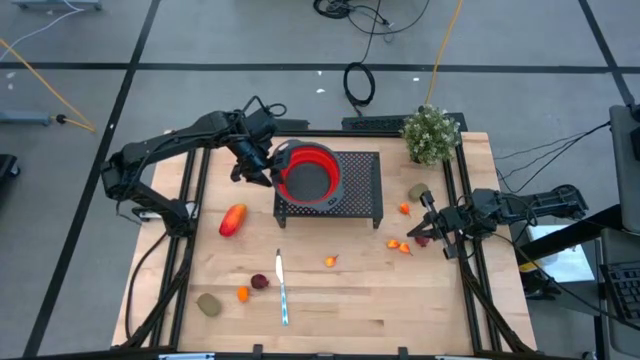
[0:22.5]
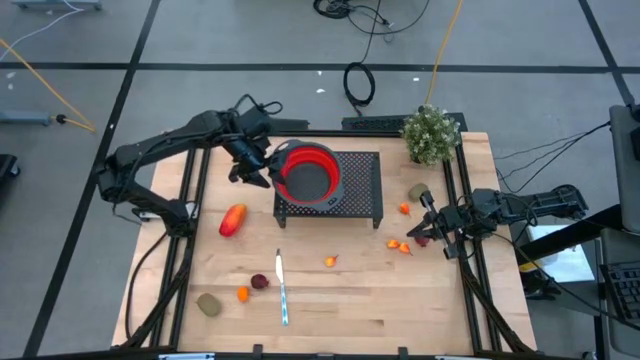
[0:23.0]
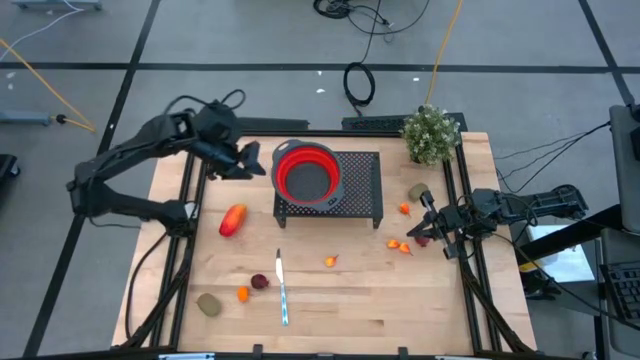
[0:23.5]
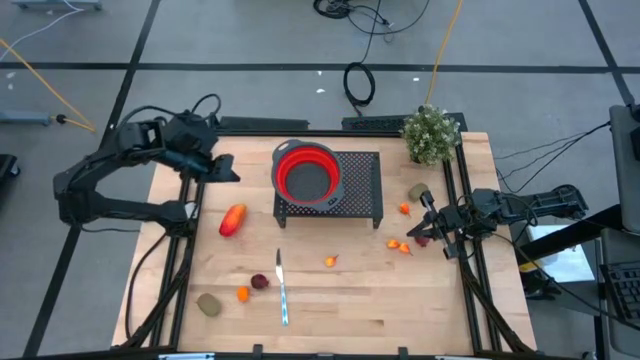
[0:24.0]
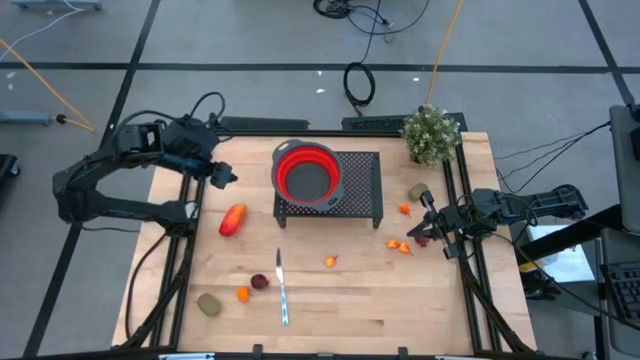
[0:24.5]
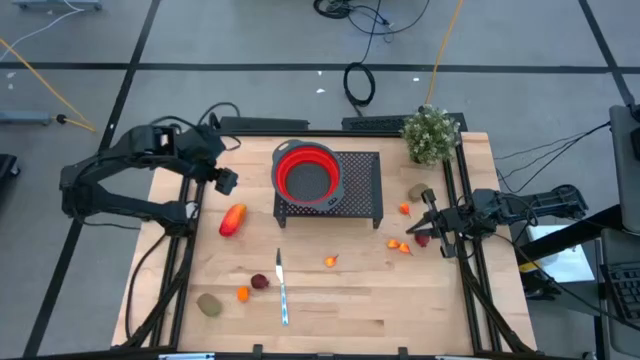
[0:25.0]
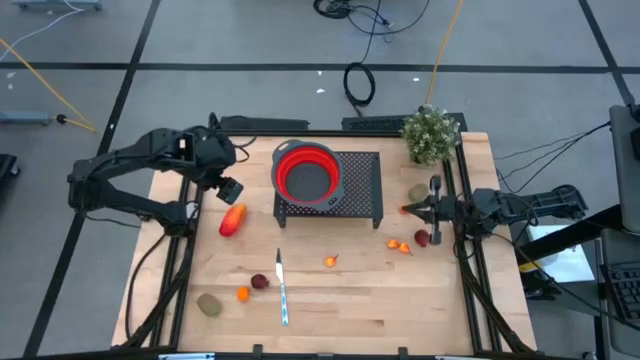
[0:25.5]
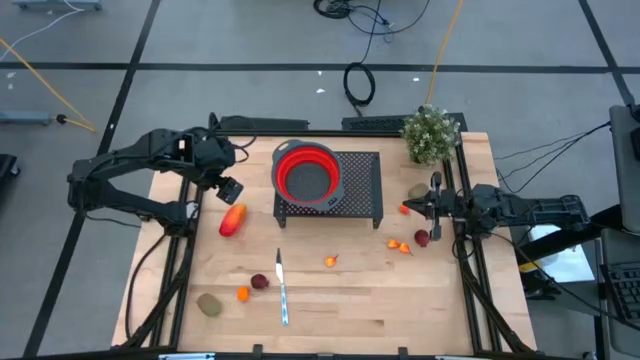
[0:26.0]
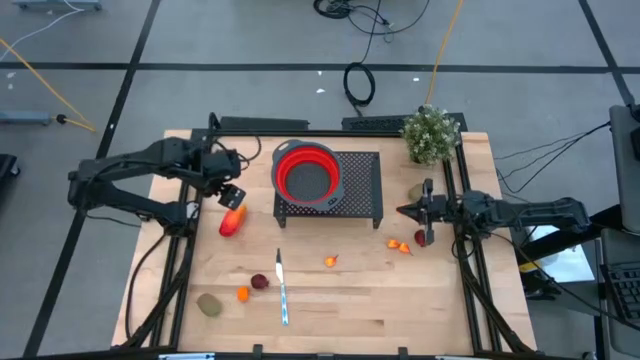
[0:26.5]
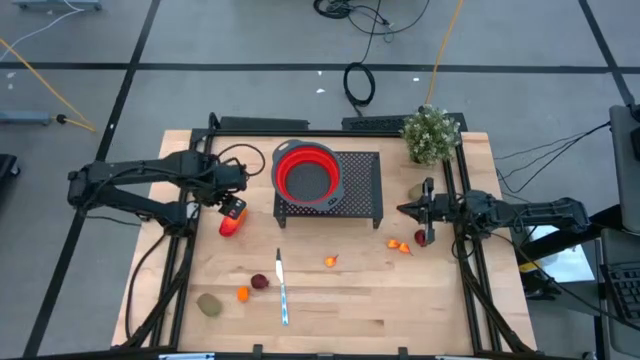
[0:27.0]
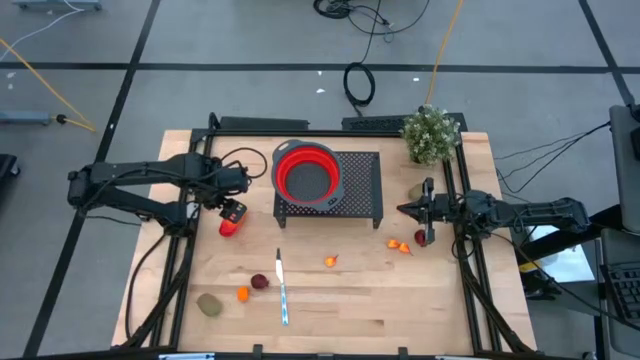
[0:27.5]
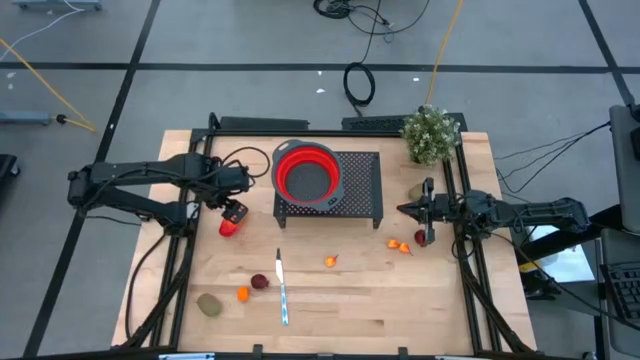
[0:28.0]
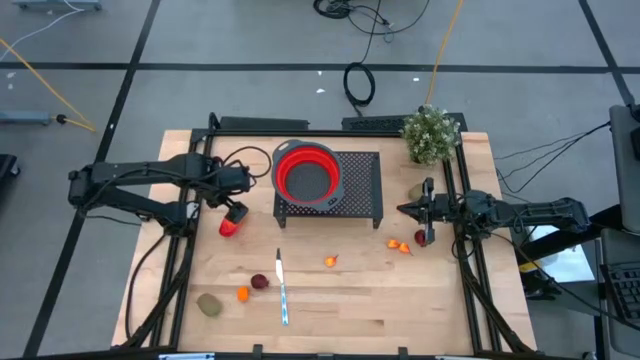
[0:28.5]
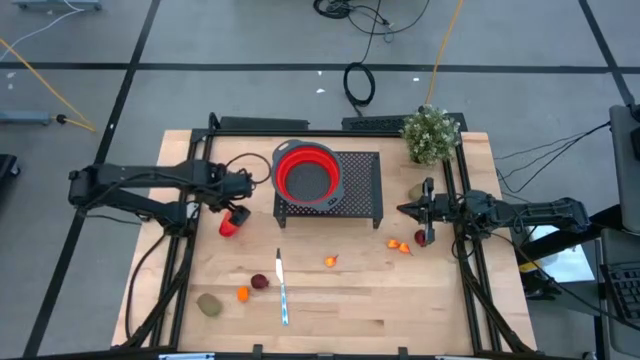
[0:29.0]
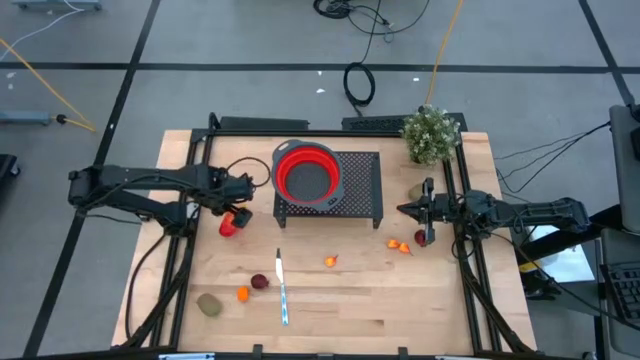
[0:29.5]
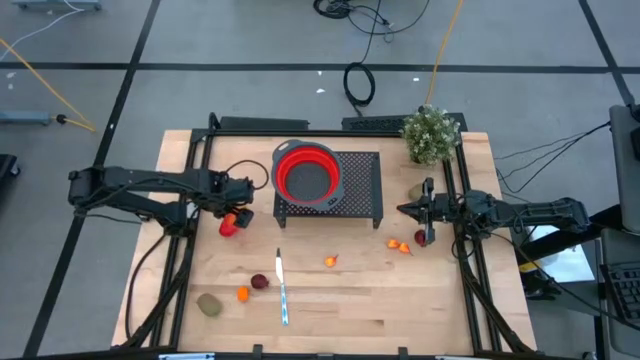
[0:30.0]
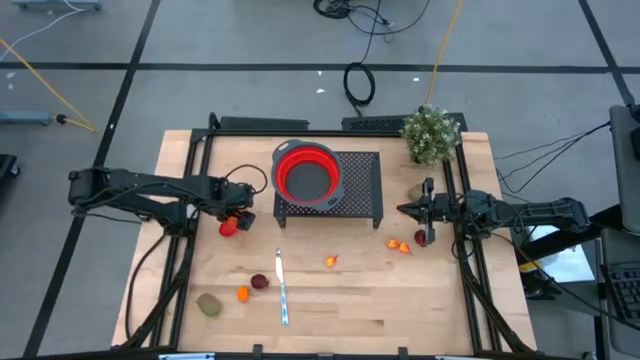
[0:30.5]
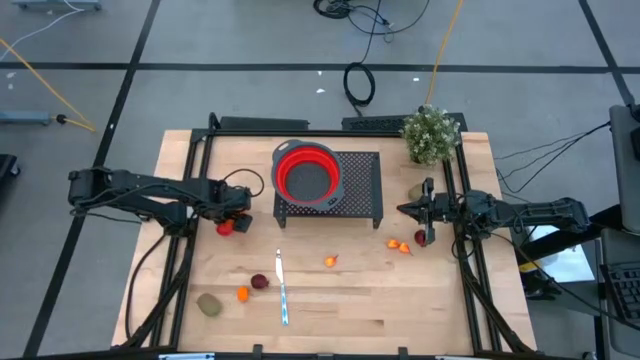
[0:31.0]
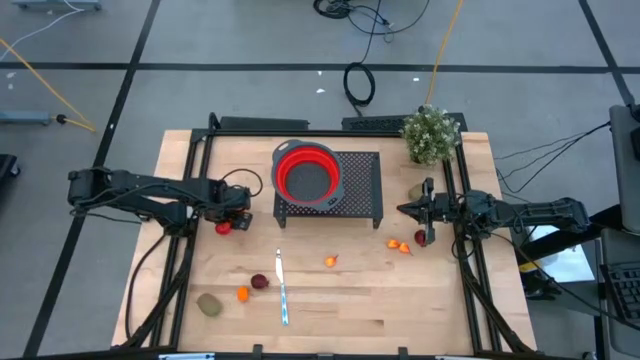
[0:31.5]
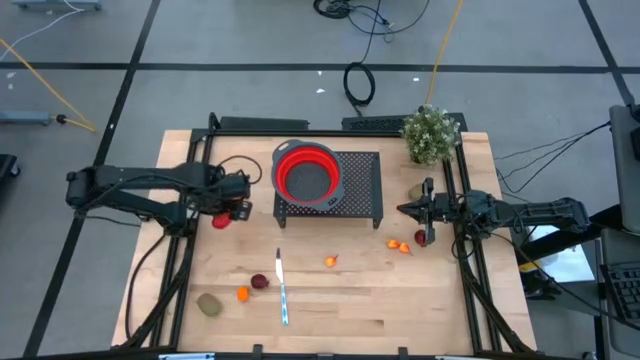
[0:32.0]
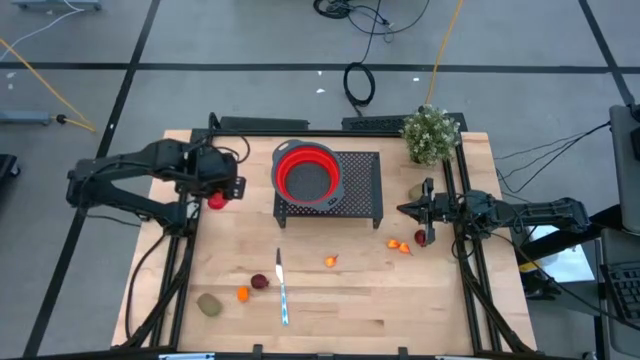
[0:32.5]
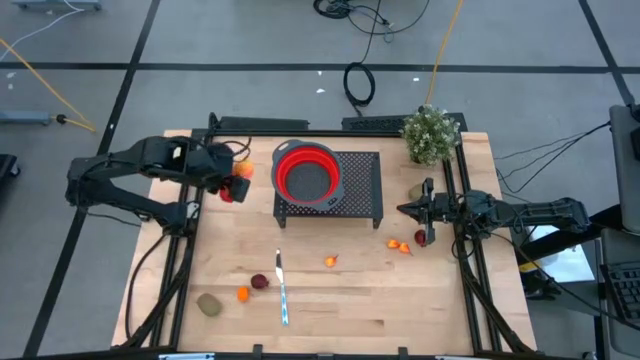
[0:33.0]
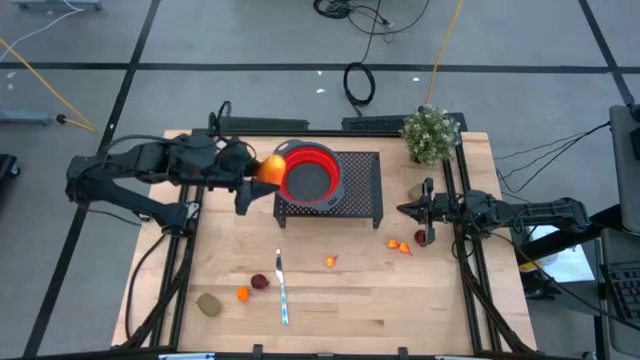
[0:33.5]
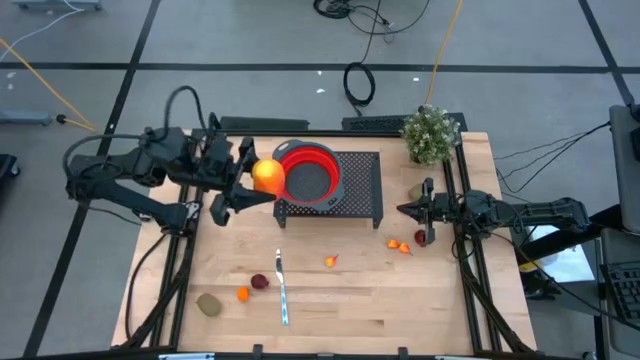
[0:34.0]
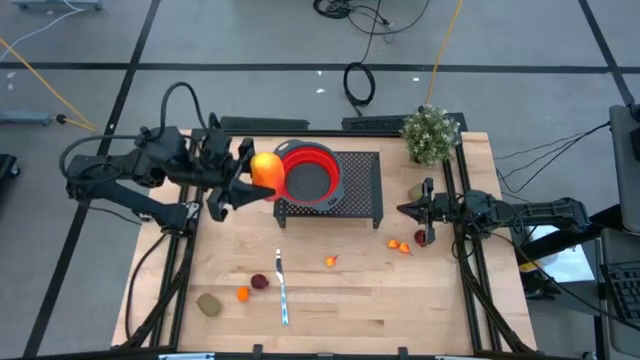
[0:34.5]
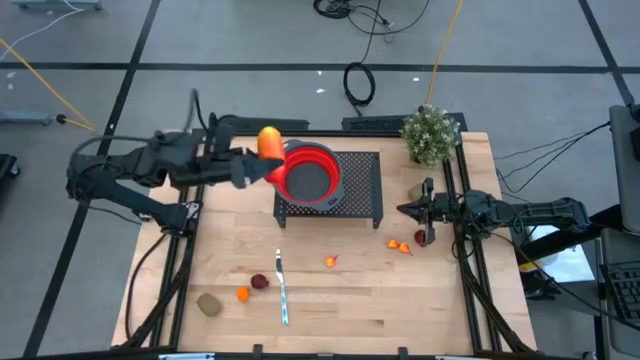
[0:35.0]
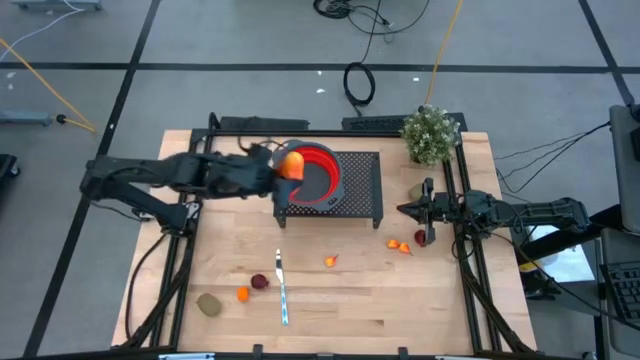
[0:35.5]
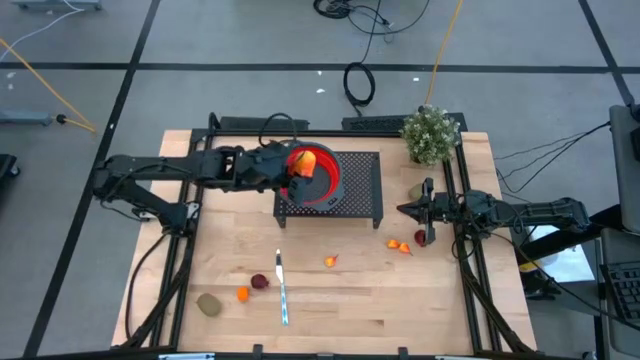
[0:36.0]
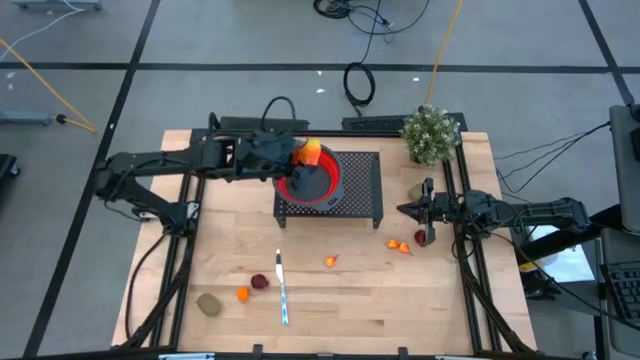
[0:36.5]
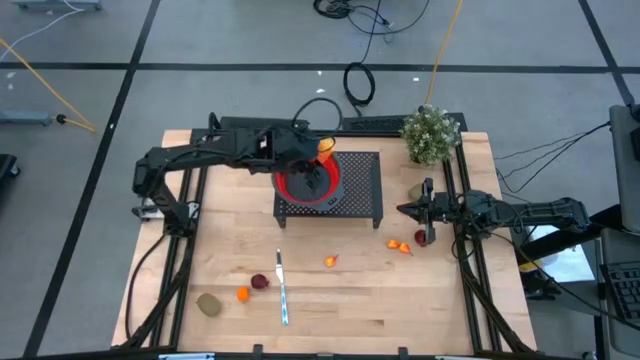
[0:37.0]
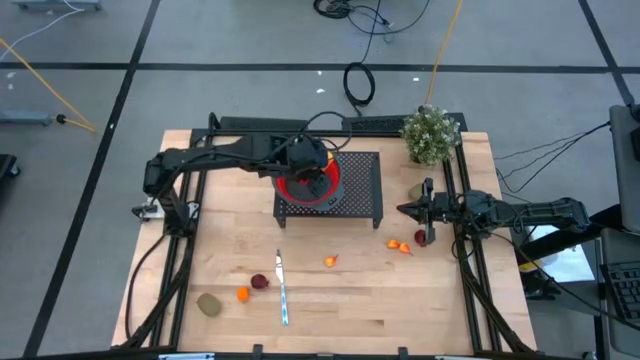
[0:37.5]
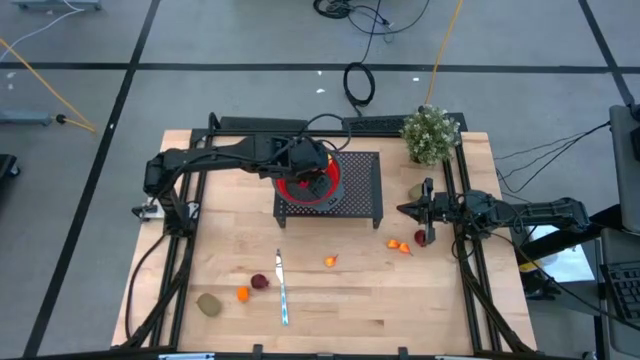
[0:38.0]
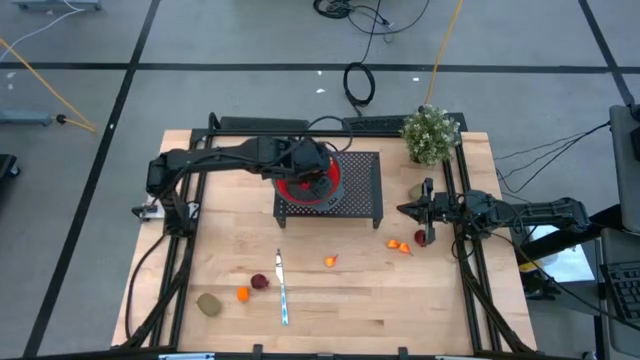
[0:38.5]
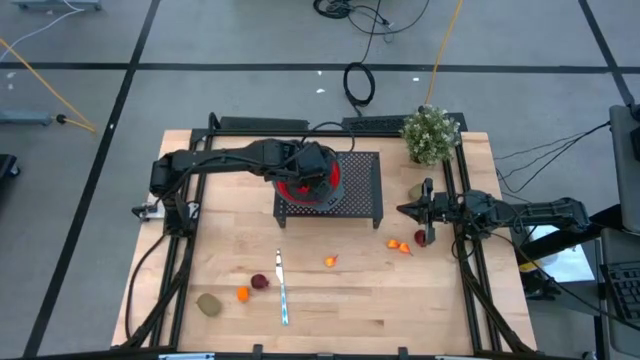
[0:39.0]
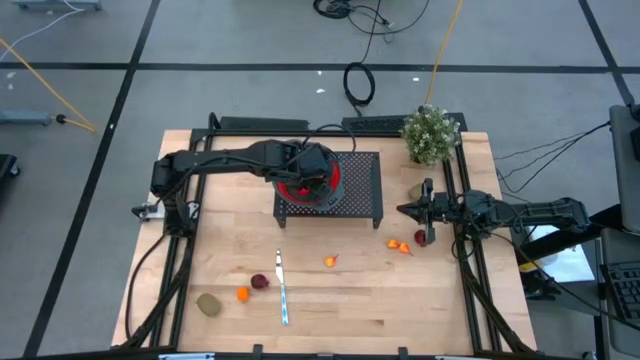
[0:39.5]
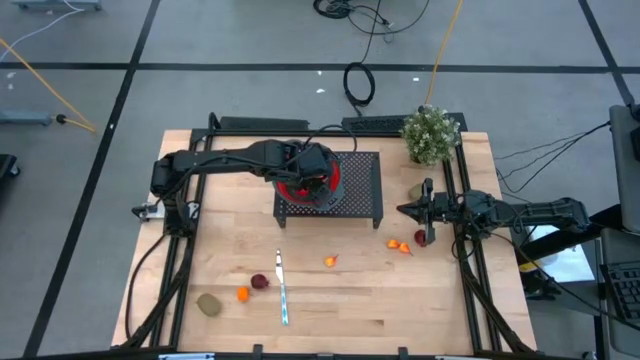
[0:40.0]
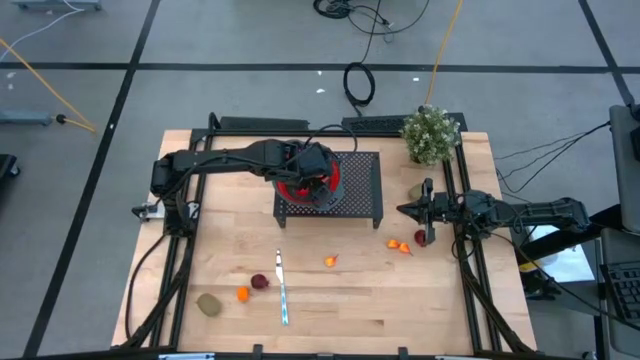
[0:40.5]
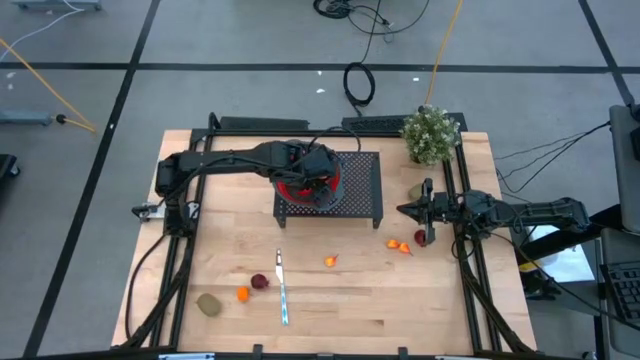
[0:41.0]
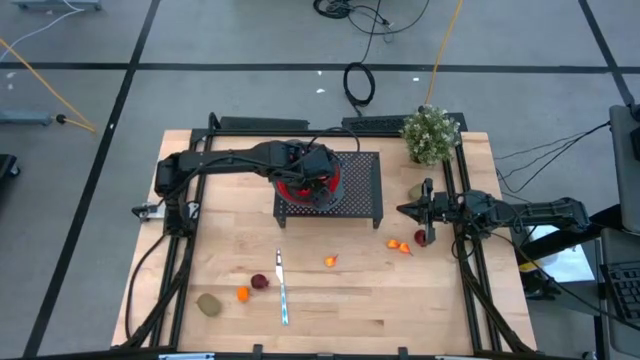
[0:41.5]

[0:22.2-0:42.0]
Task: Pick & Place Fruit
Put the mango into the food strainer on the shelf
